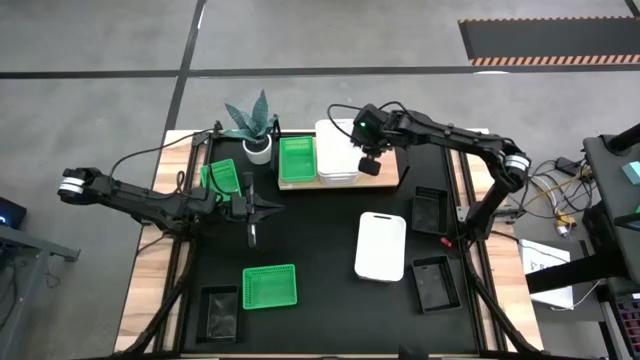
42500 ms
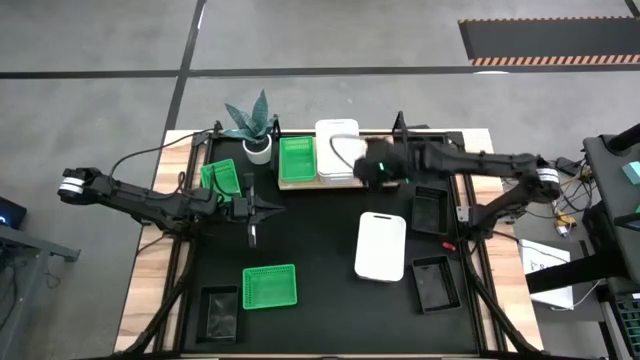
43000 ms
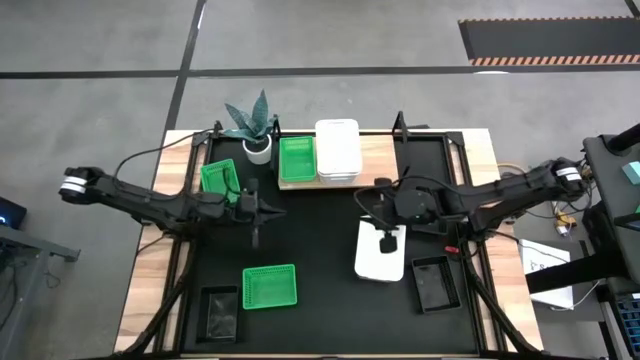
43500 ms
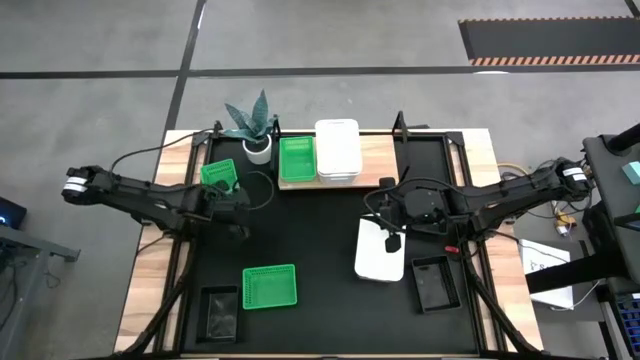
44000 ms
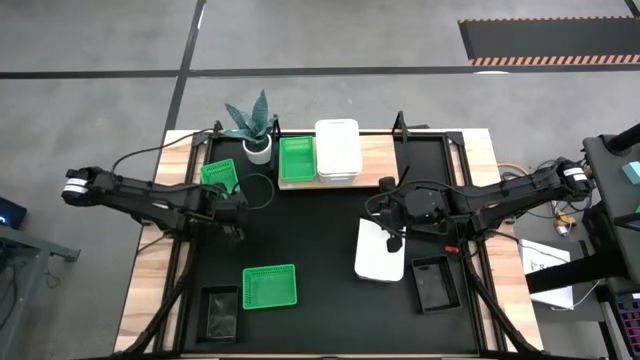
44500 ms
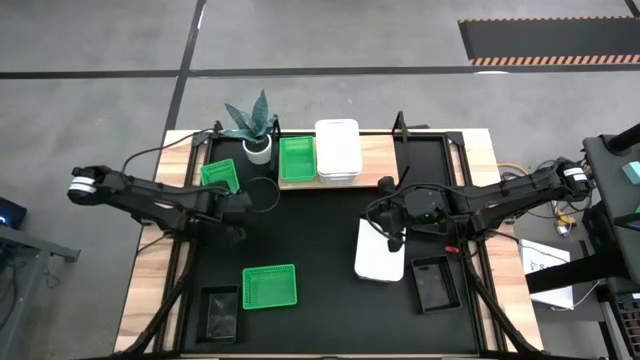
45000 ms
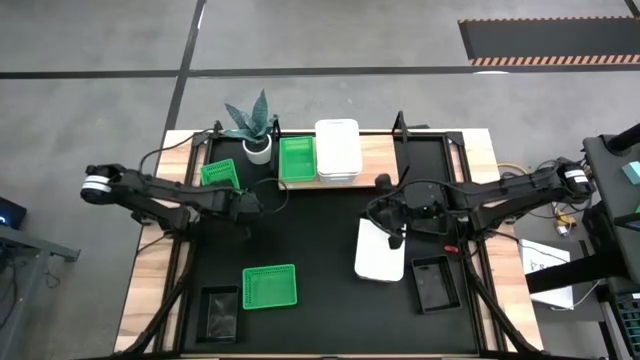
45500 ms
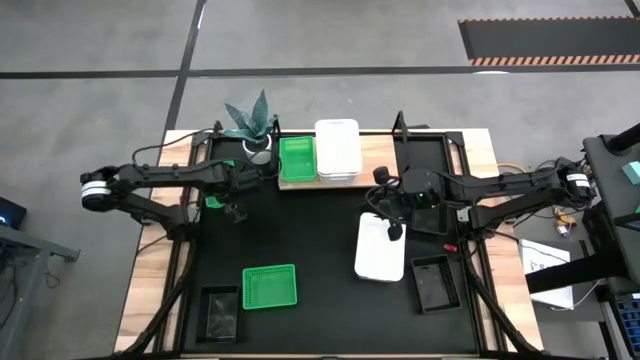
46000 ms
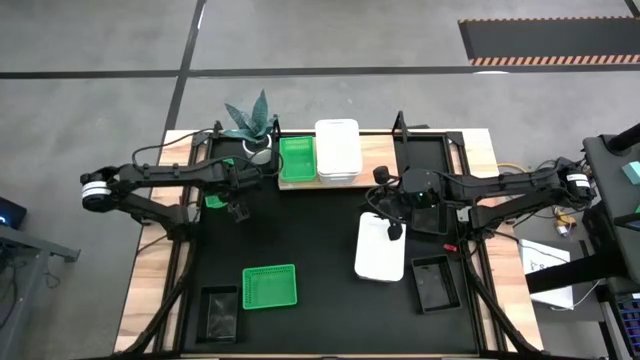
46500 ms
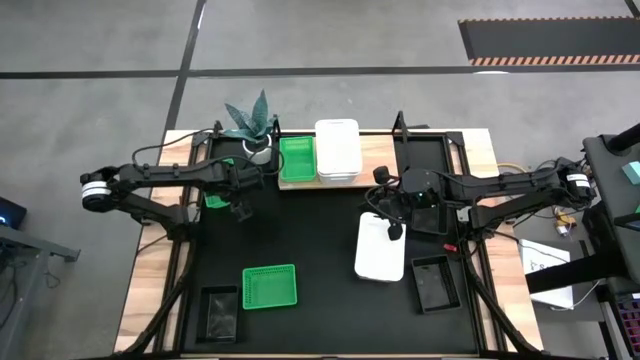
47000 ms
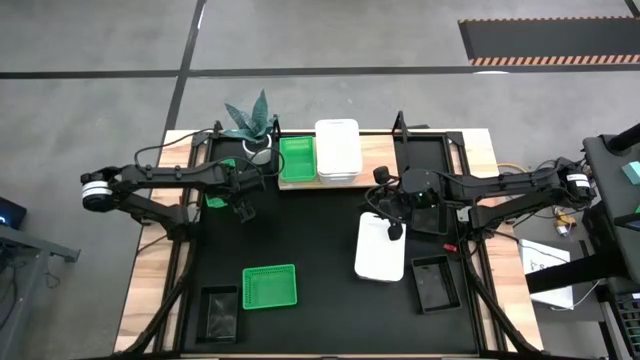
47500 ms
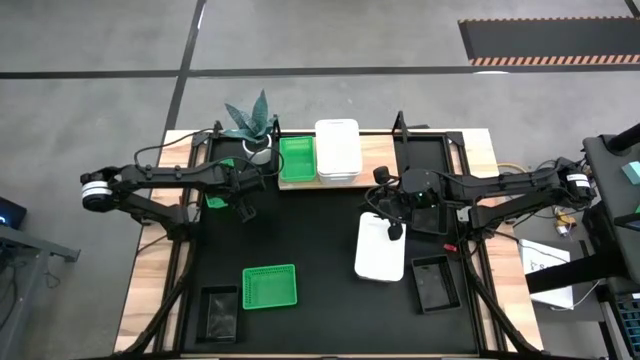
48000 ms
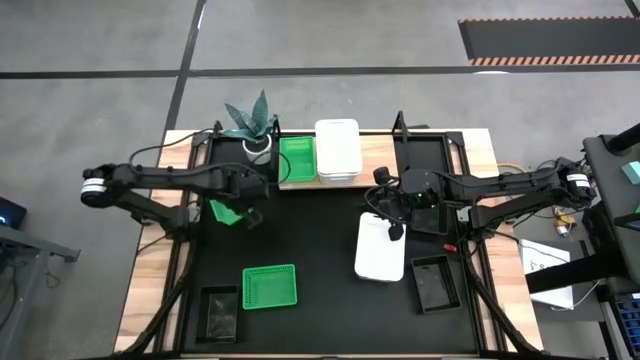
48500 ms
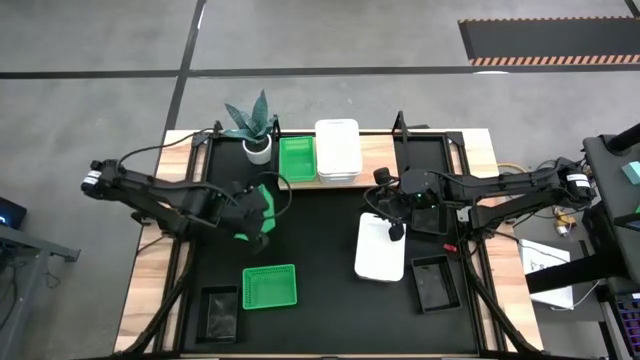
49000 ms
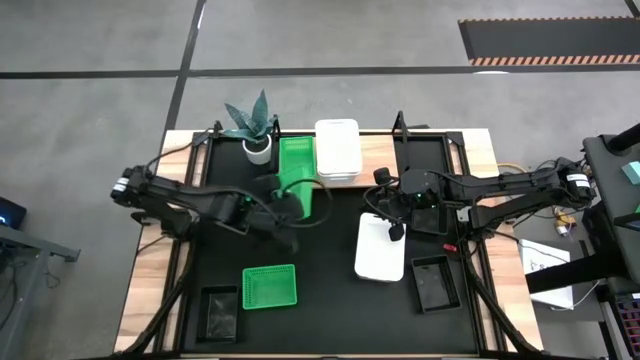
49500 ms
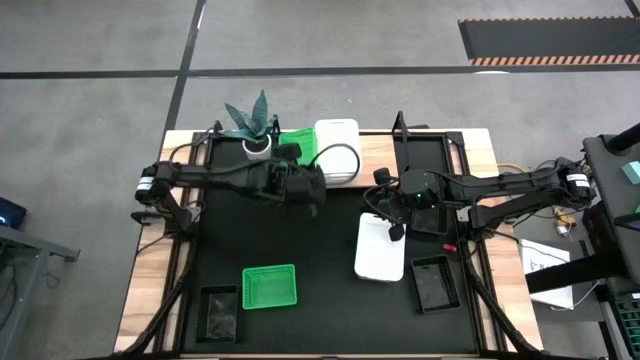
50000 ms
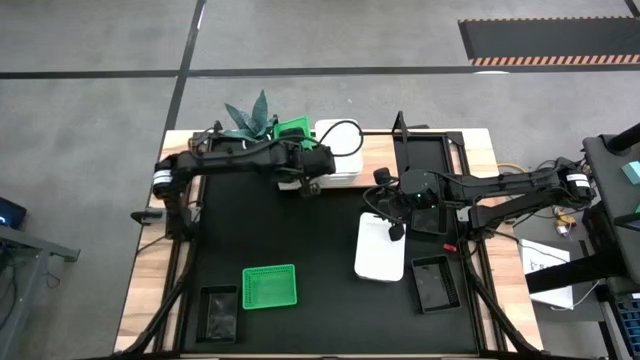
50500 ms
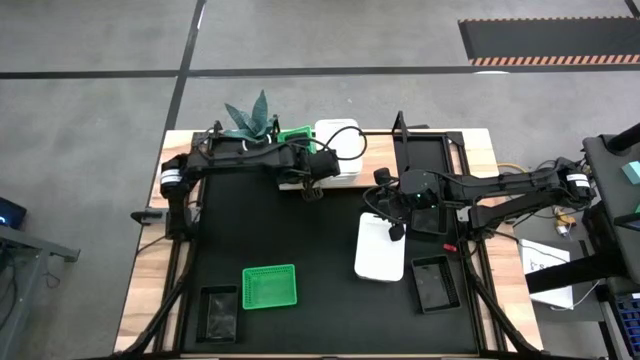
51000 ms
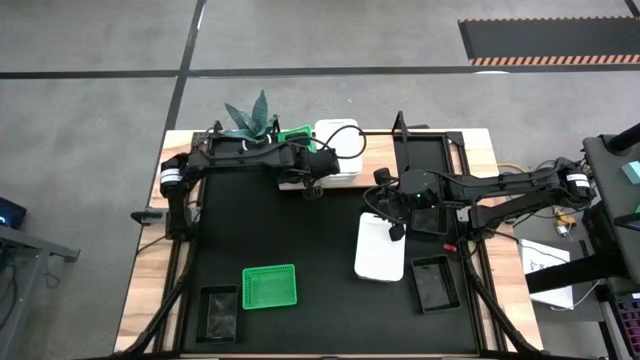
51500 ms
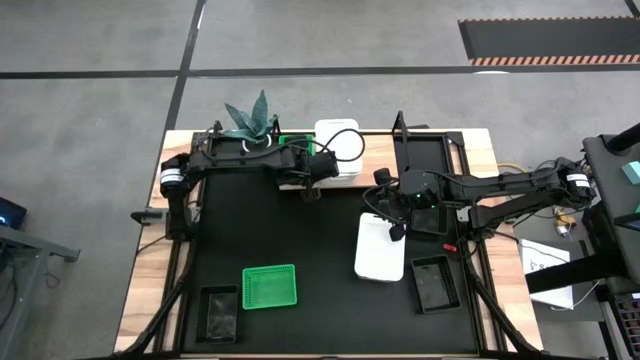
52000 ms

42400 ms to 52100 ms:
Task: Stack baskets on shelf by color
Stack the top green bin into the green bin on the shelf

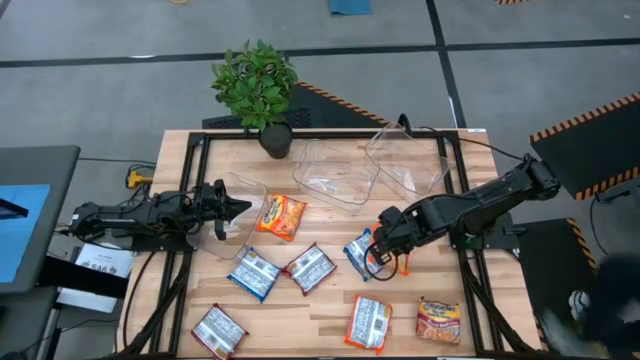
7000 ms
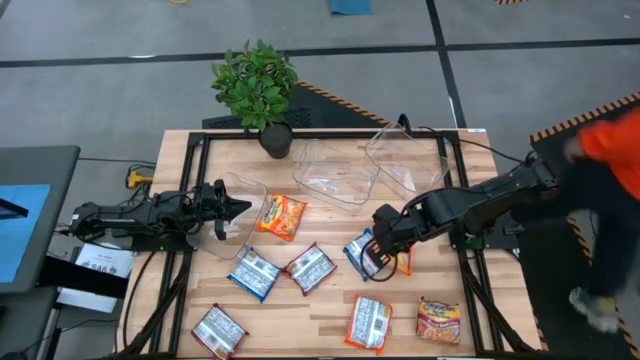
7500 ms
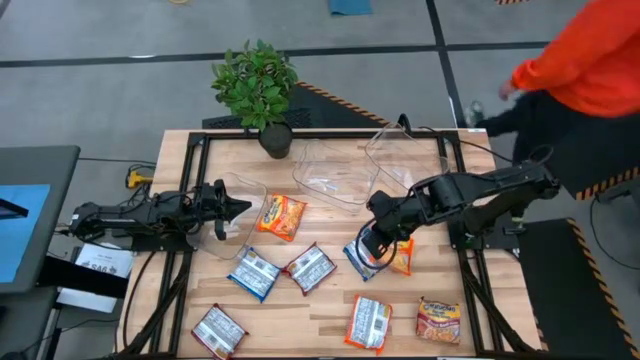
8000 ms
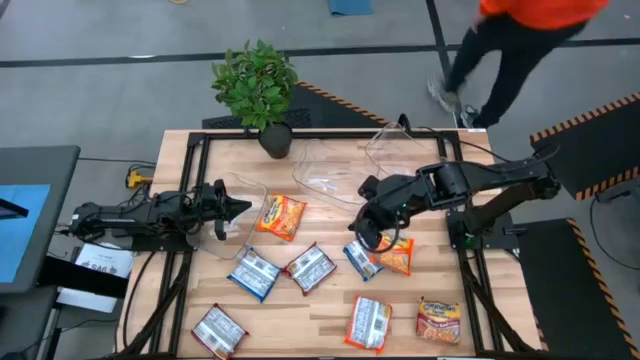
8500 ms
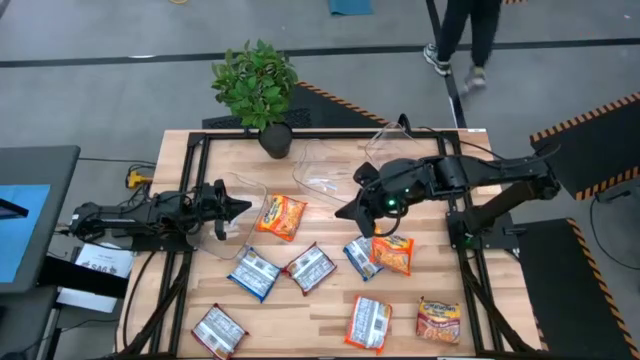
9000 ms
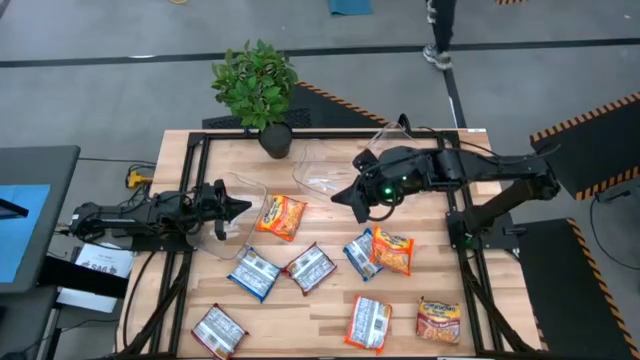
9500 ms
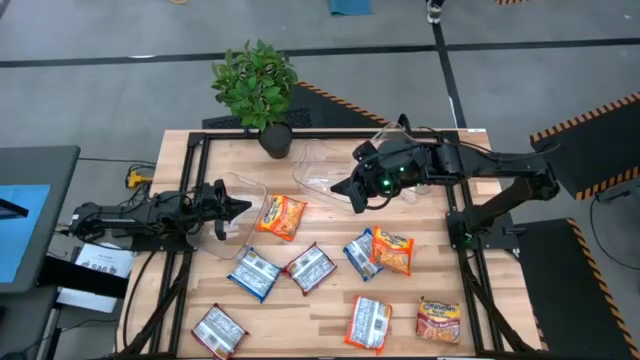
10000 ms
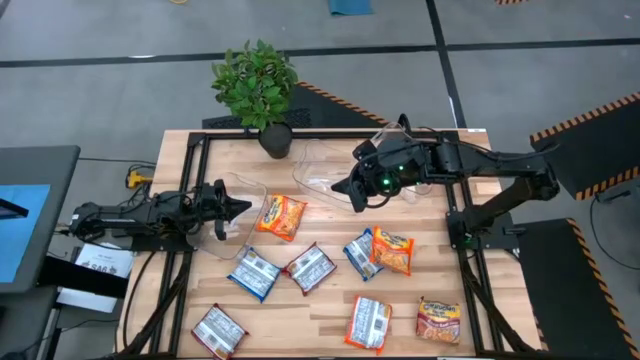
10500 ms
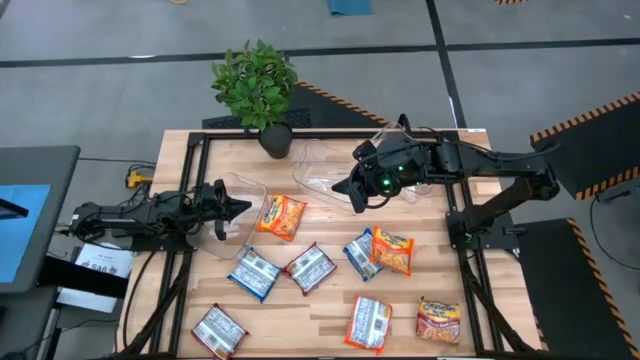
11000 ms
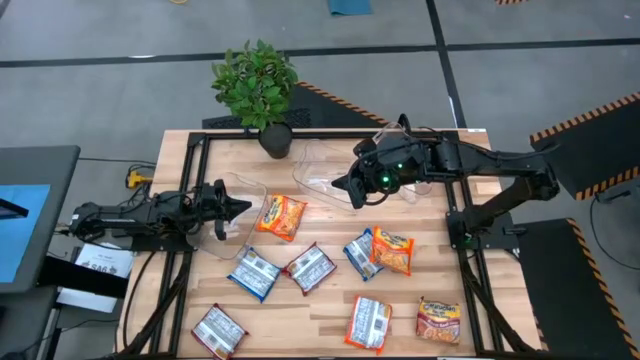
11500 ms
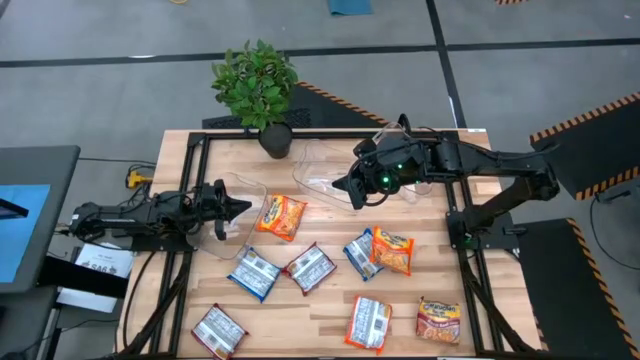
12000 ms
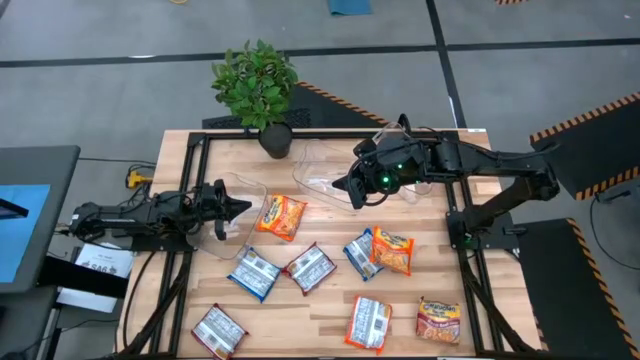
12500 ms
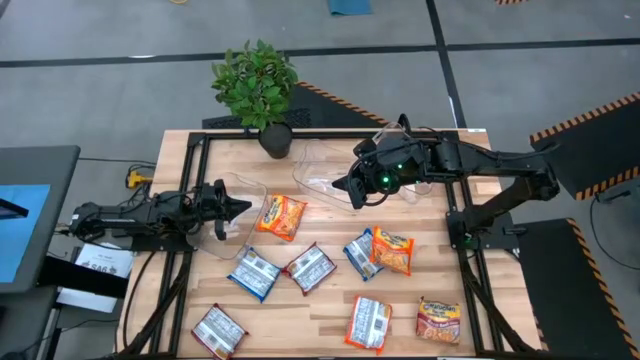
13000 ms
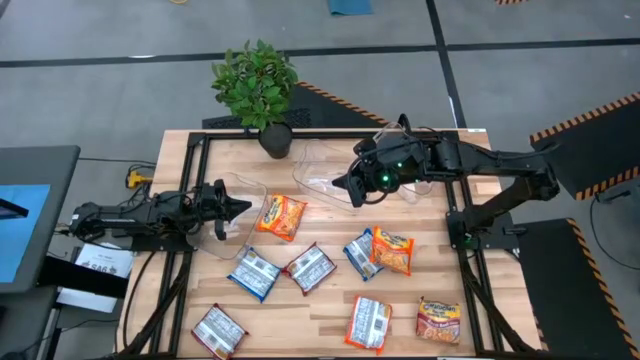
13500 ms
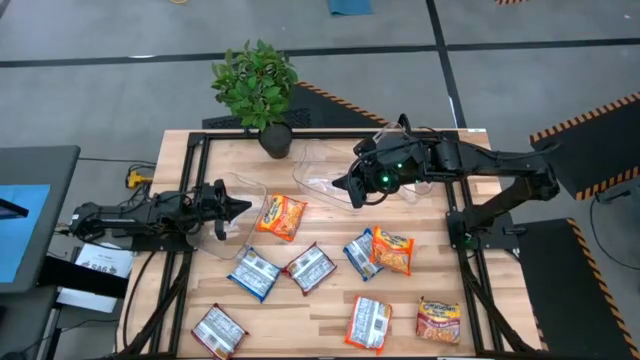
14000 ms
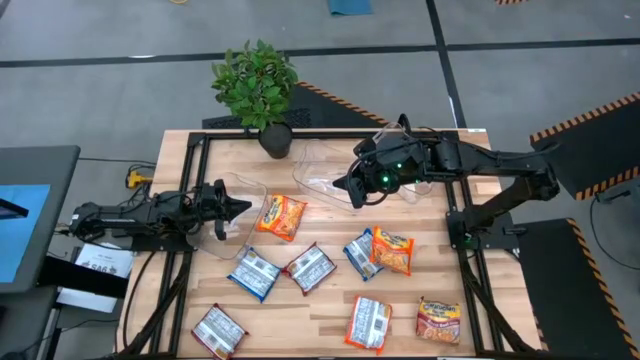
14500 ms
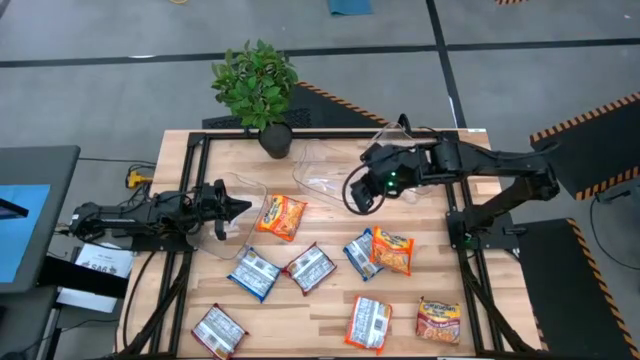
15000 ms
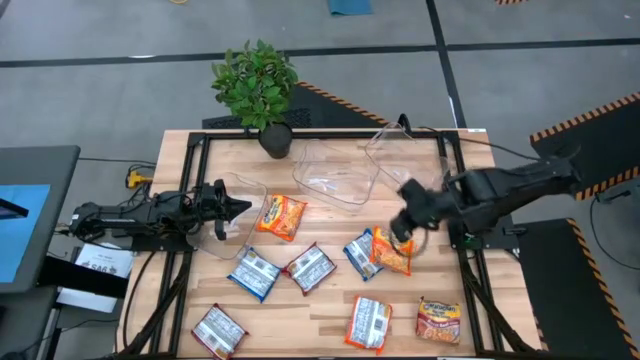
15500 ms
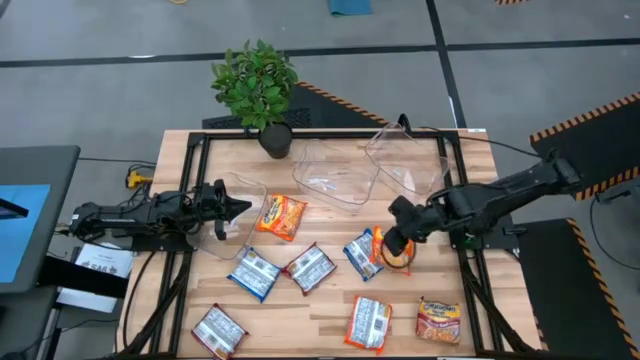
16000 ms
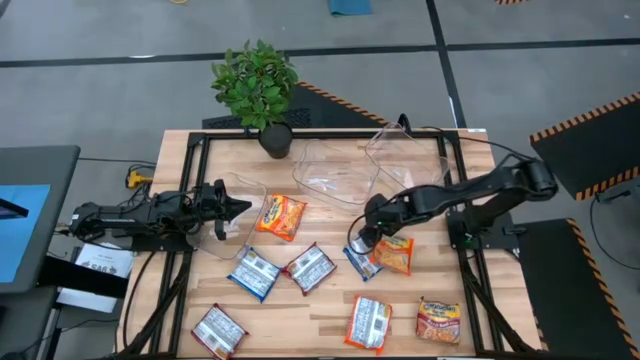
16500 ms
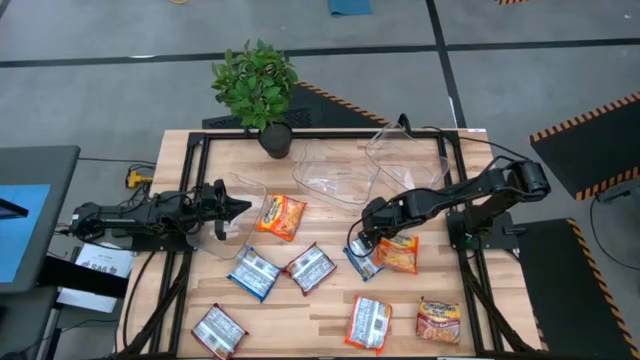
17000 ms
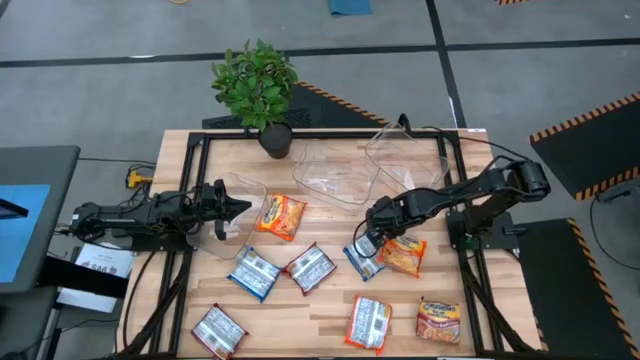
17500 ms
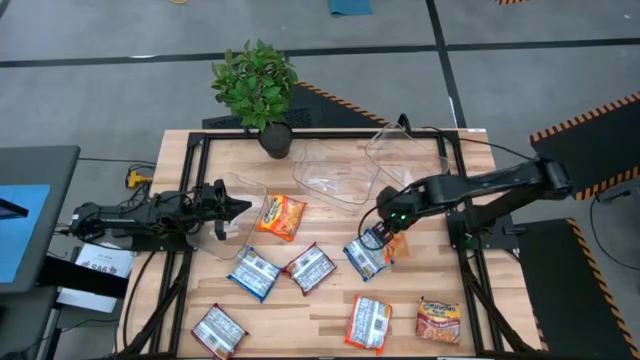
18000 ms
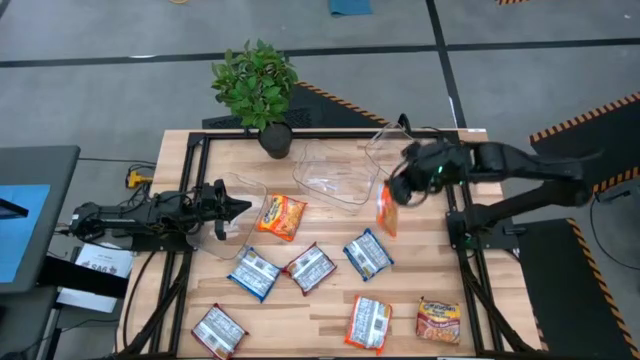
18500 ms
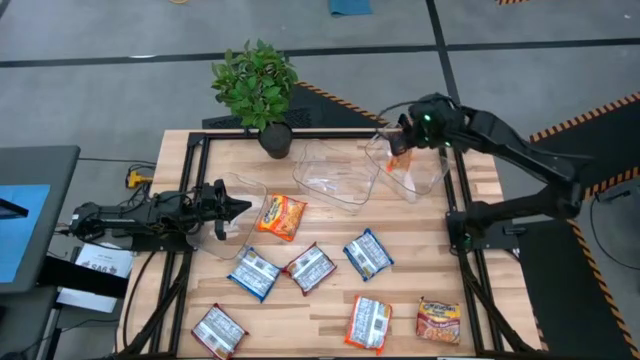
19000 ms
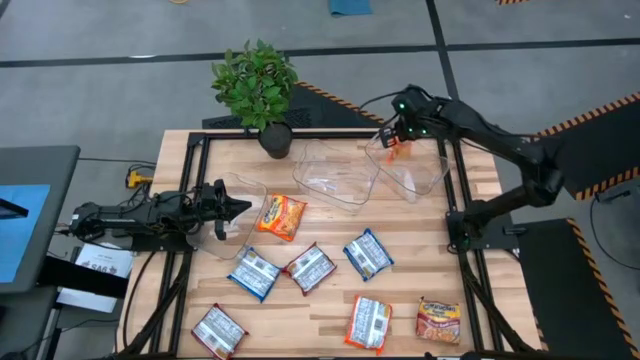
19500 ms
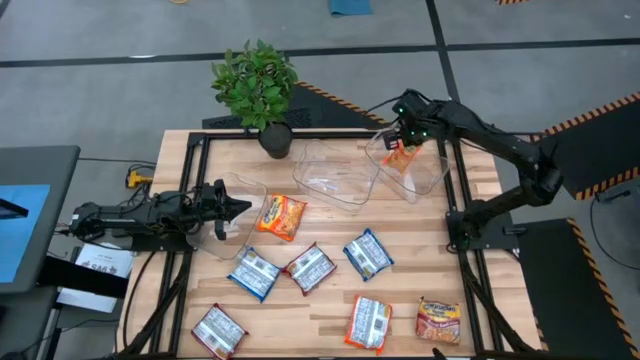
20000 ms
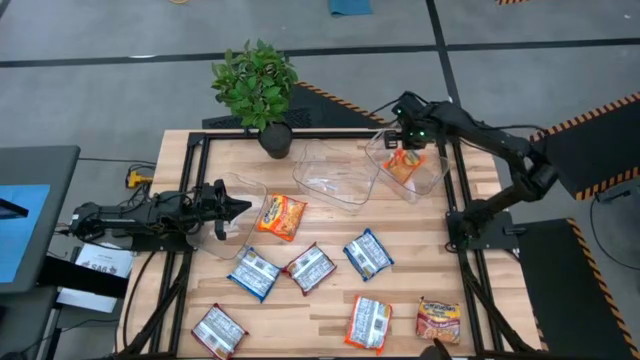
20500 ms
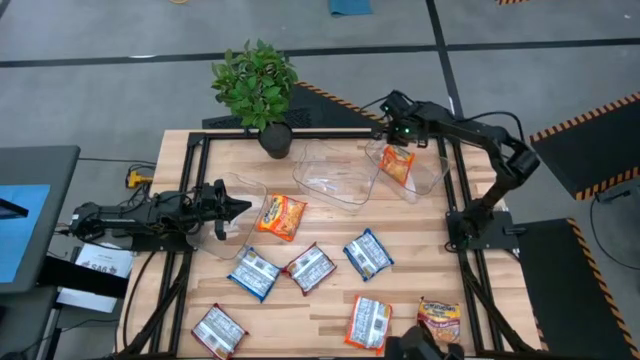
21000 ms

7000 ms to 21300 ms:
Task: Sort Maruchan noodles
Put the top right orange noodle pack into the right transparent bin
